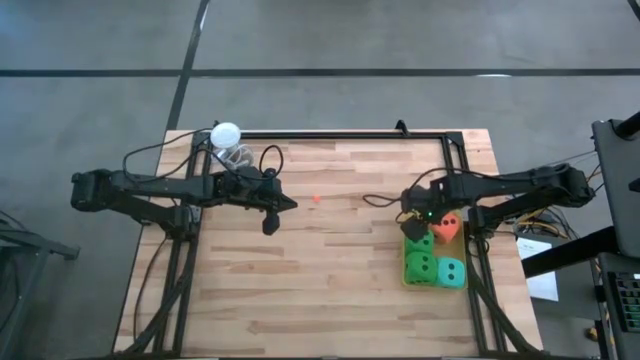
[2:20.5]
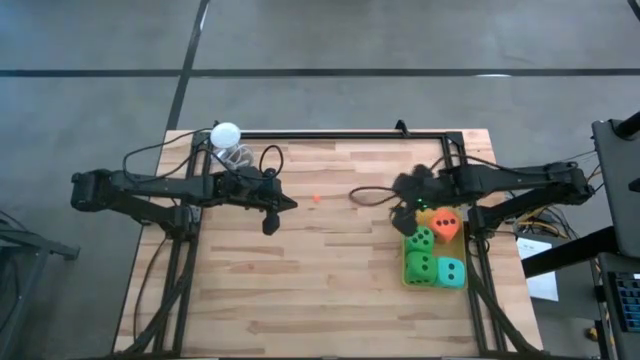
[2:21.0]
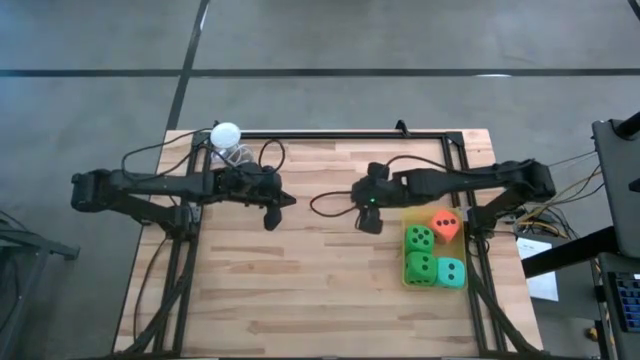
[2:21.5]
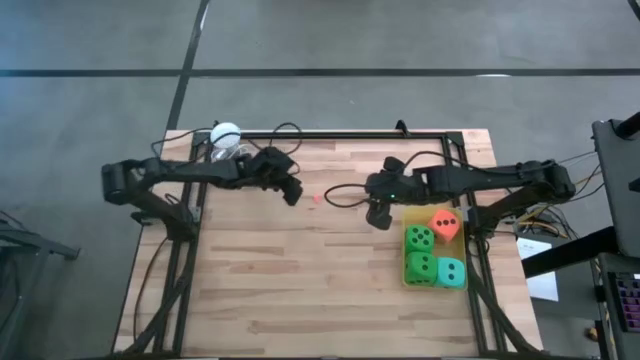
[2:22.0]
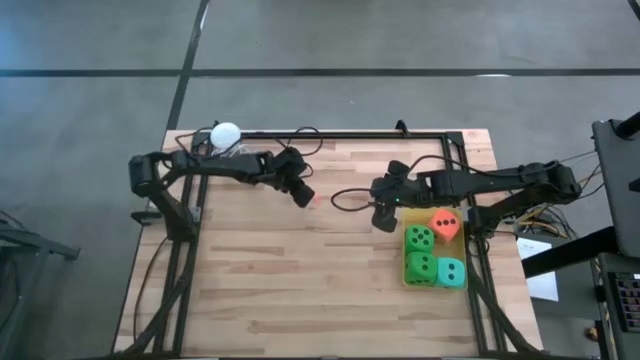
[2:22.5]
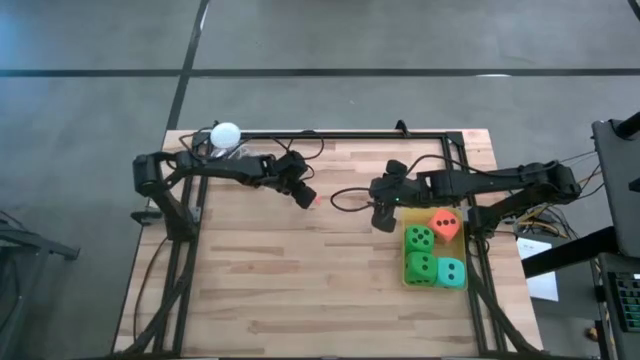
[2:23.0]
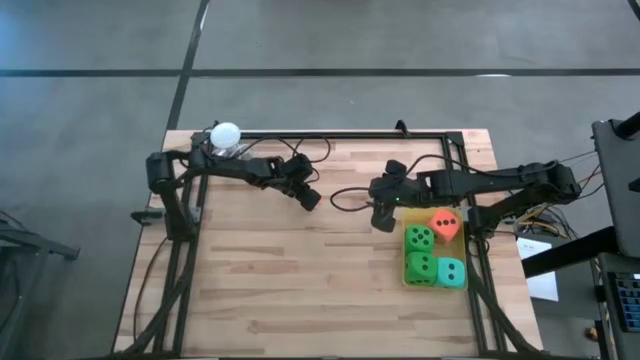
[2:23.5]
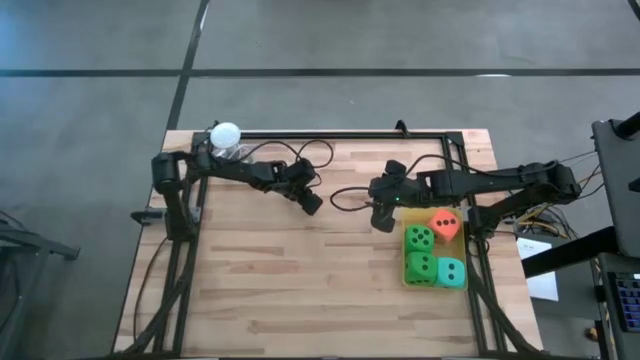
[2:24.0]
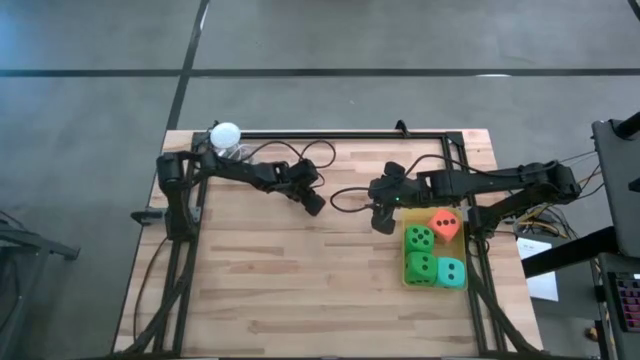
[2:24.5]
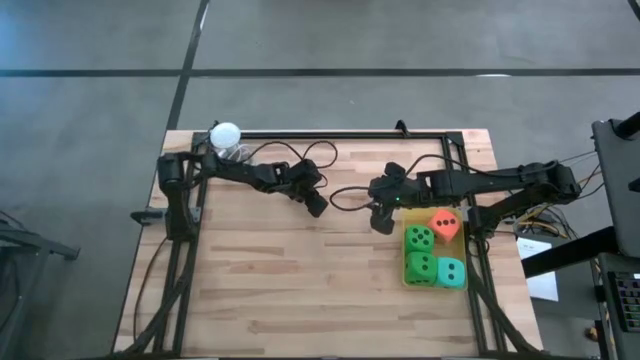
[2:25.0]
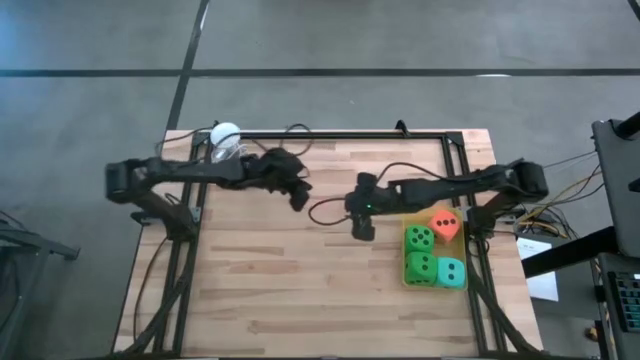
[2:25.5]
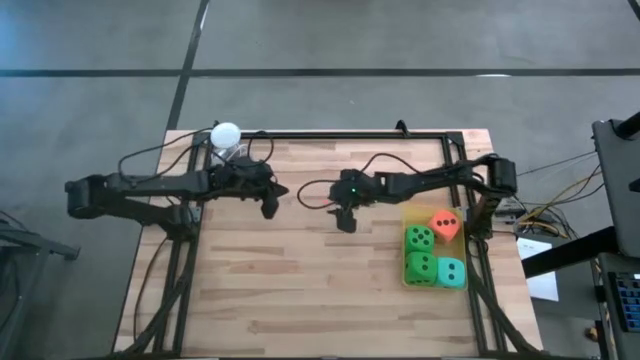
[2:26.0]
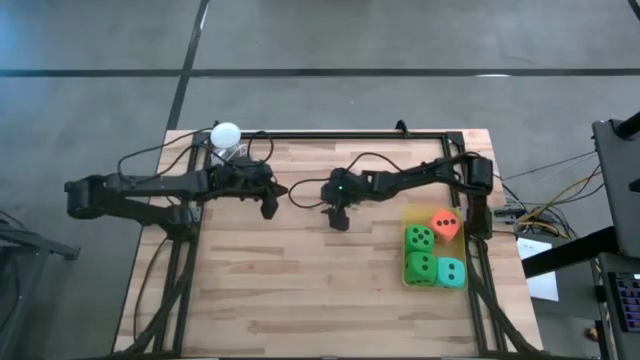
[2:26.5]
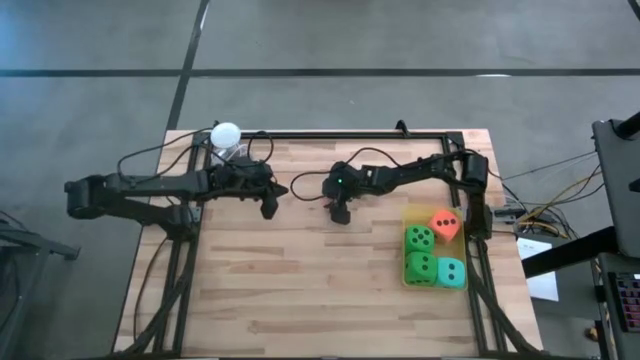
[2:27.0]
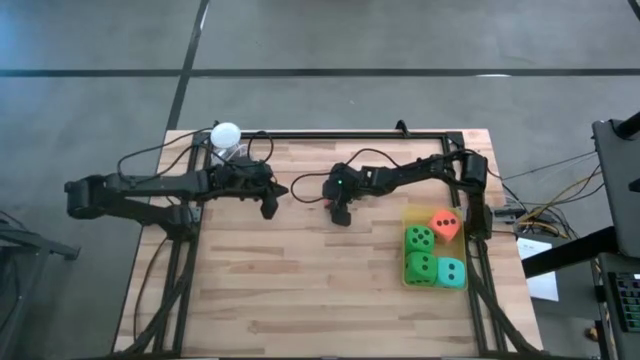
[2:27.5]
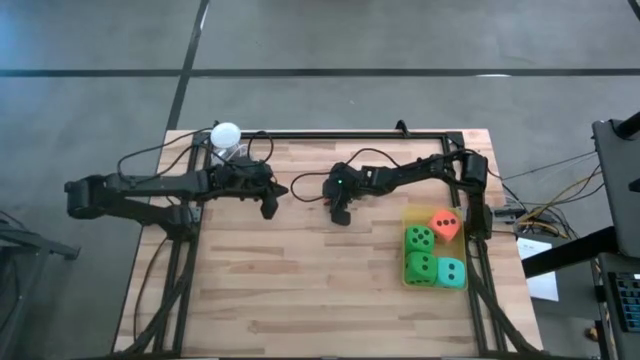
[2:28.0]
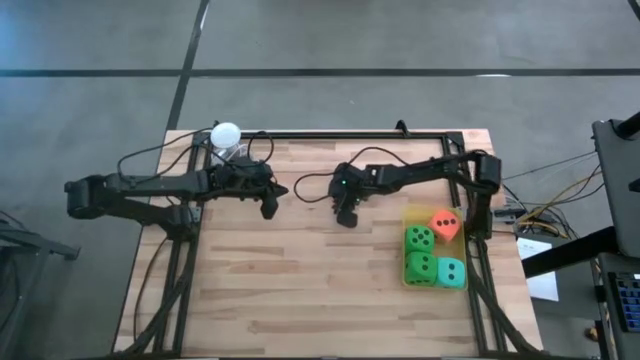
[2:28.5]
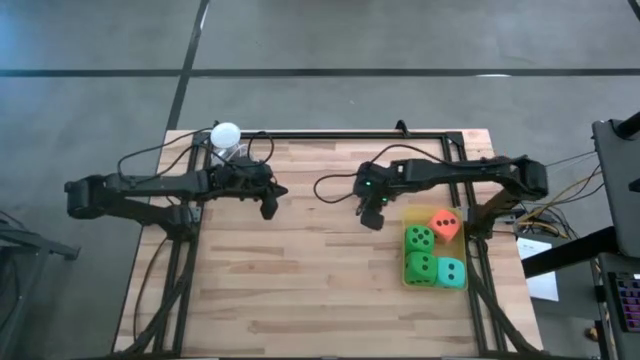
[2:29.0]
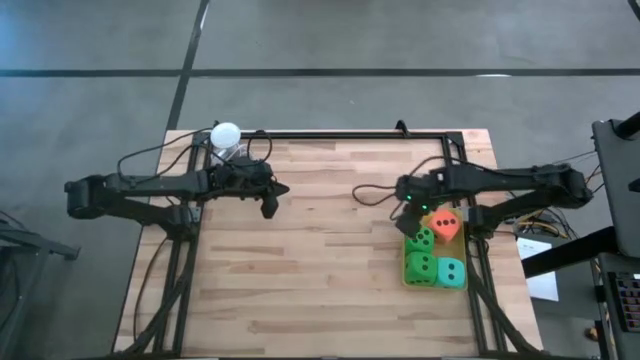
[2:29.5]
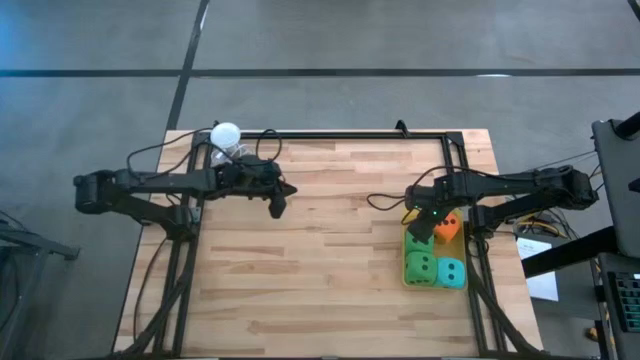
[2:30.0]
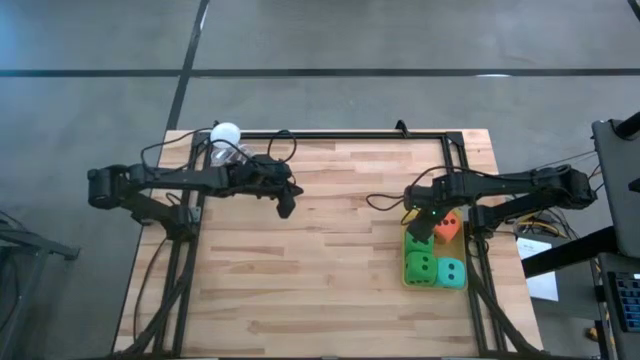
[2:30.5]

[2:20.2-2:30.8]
Task: Pick & Place Dice
Put the small orange dice into the yellow bin

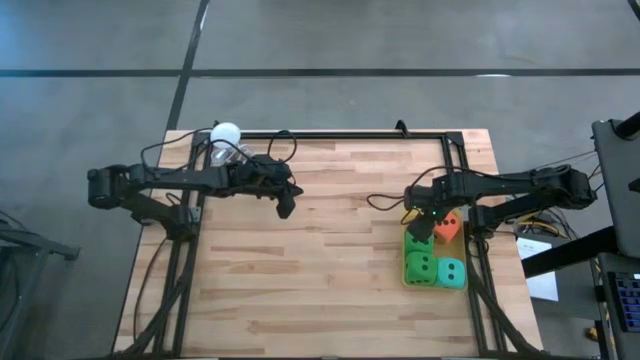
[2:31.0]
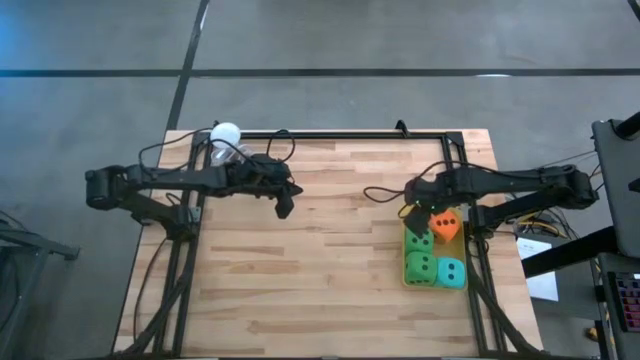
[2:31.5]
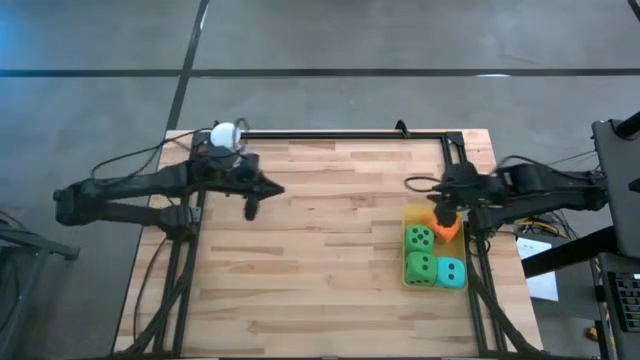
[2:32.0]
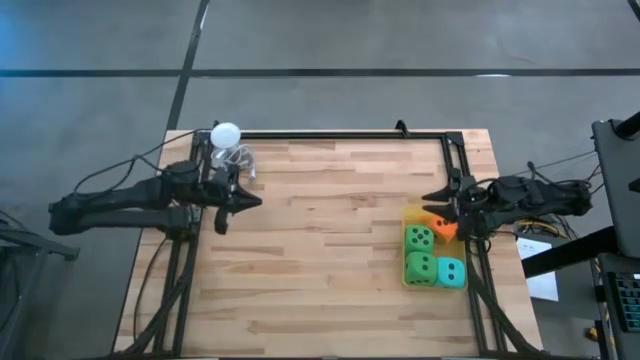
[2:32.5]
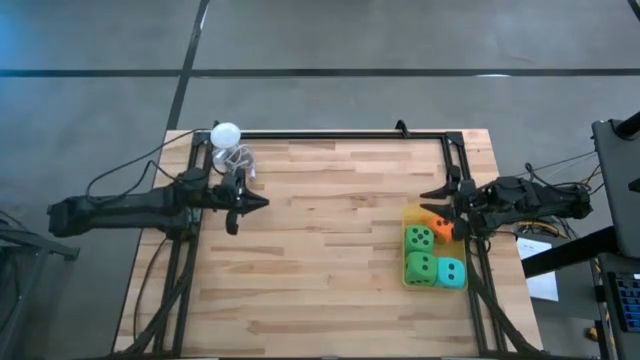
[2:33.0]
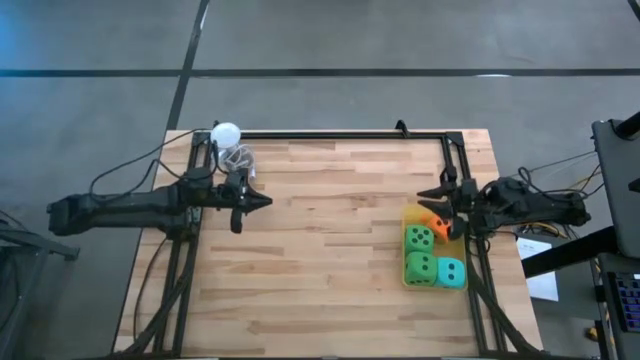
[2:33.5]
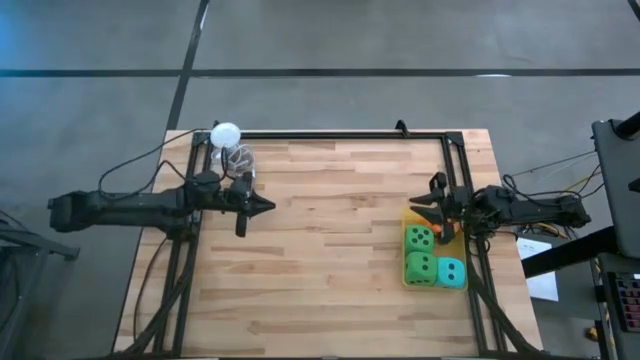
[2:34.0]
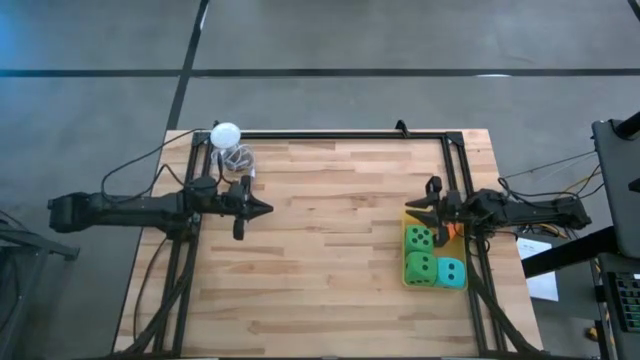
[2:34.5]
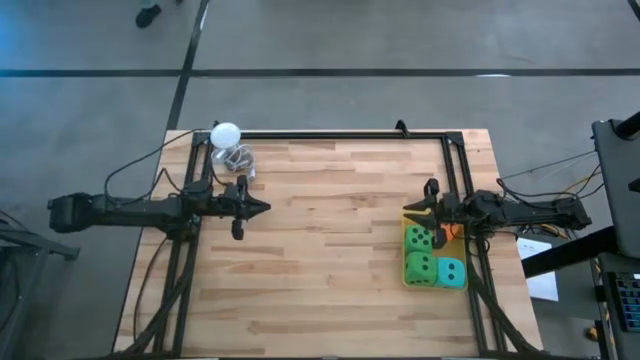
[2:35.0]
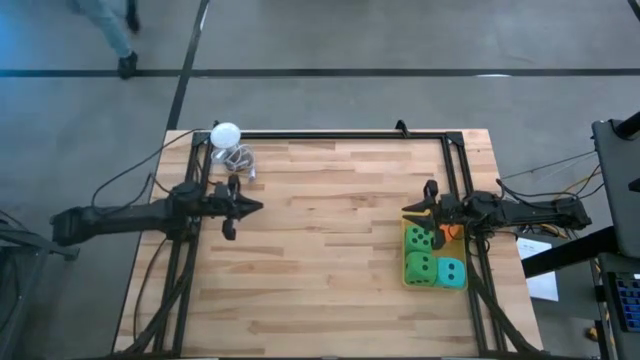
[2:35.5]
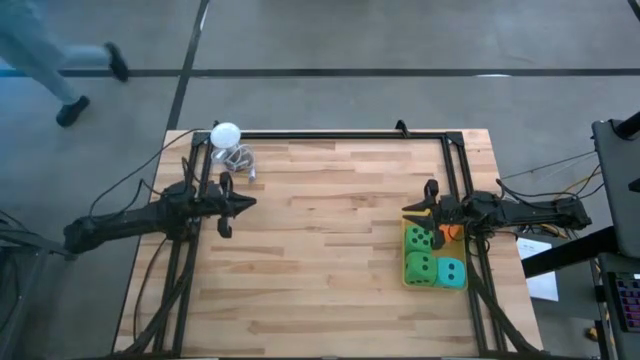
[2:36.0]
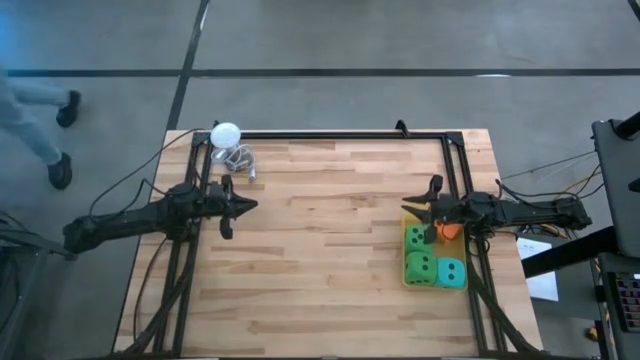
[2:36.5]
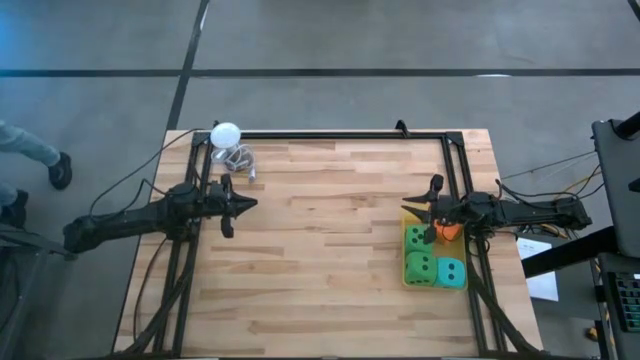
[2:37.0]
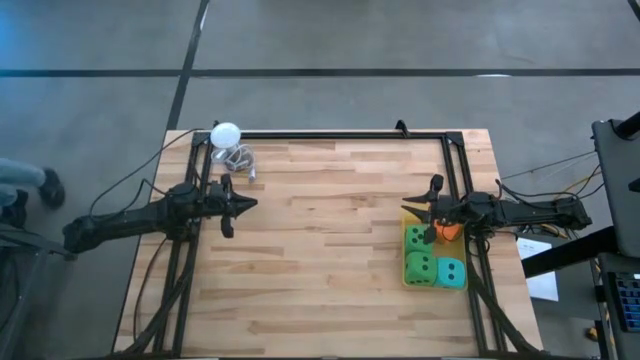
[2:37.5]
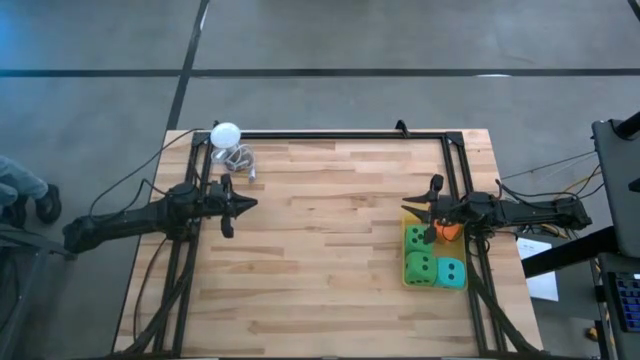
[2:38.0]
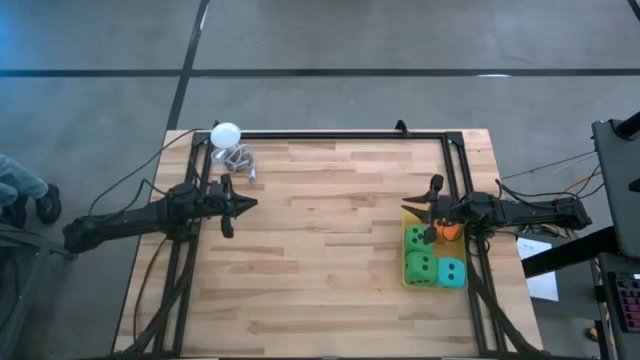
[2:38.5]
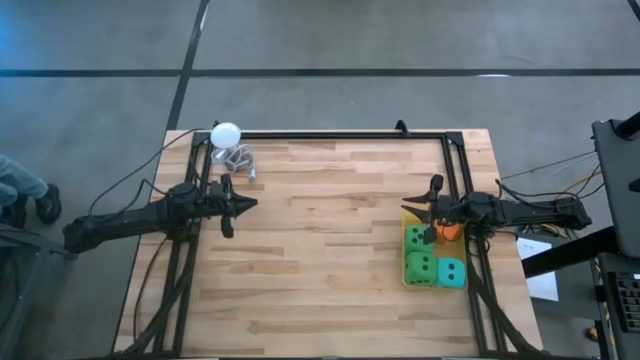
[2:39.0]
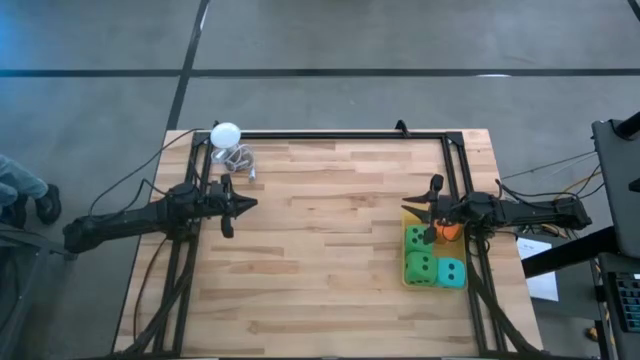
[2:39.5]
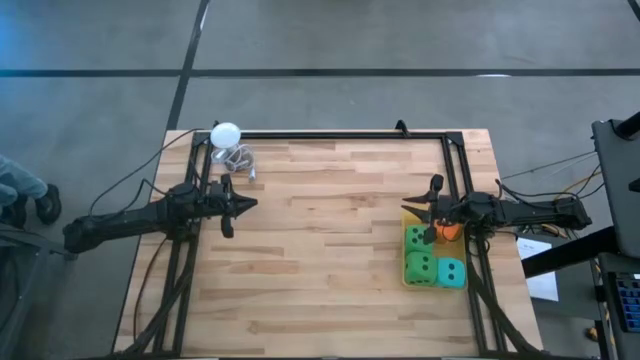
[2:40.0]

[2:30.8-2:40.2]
Return to Home Position

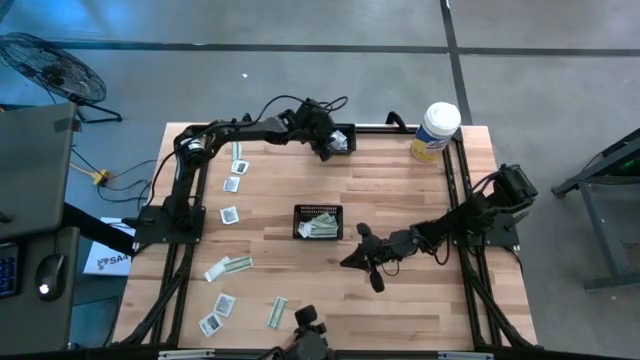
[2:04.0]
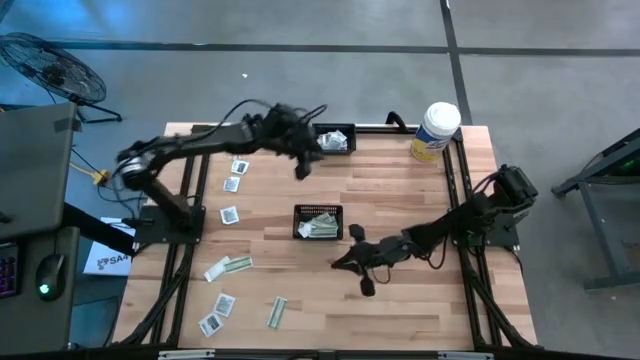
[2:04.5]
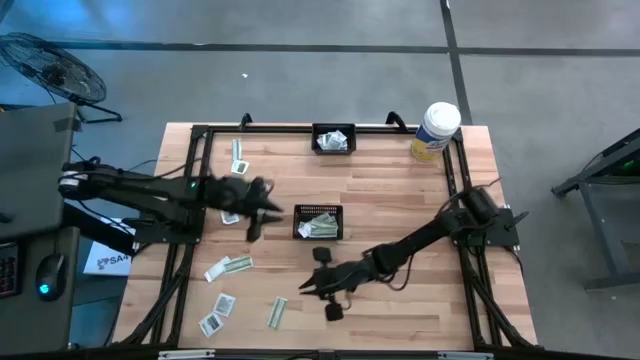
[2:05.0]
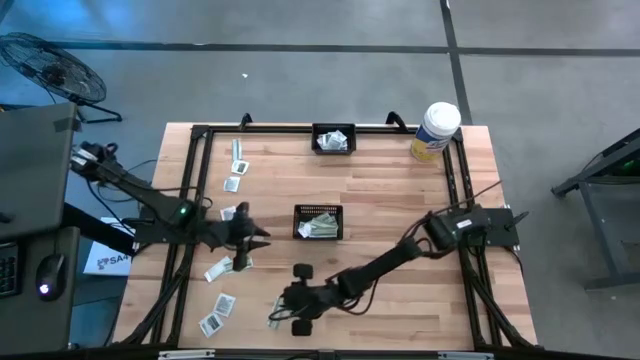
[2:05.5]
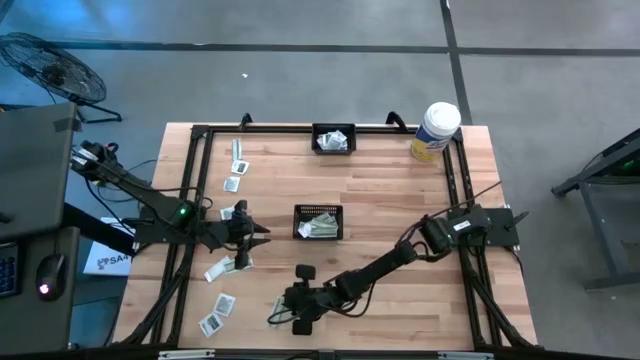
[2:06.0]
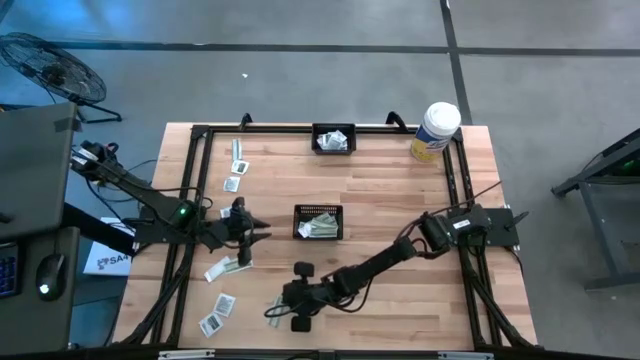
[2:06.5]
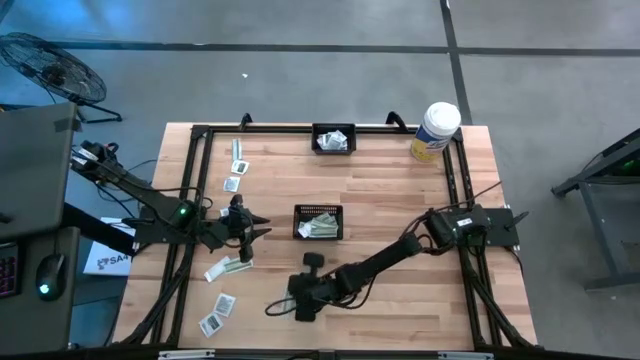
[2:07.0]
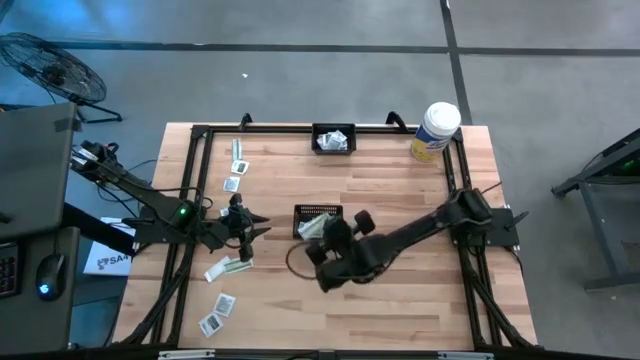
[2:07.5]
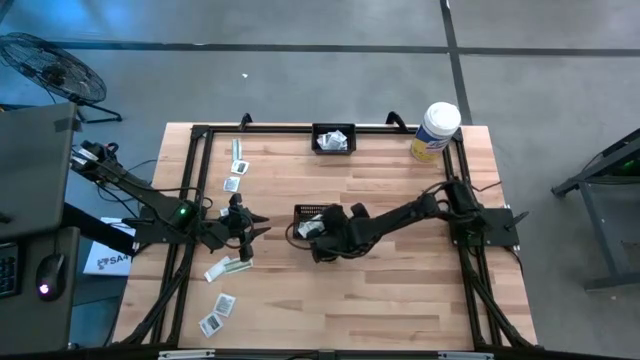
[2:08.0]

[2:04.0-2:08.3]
Task: Pick & Place First Aid Supplies
Put the bandage into the bottom black basket
